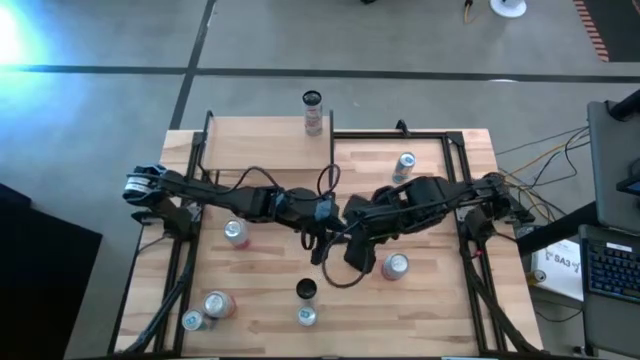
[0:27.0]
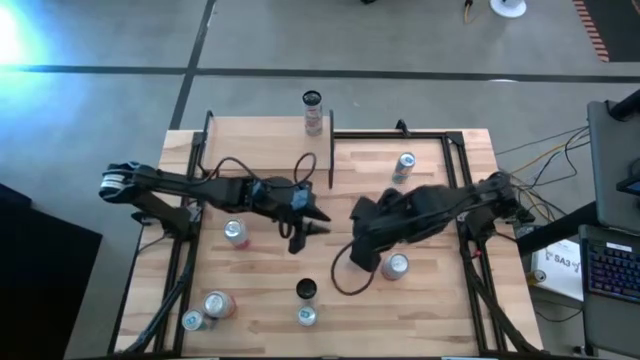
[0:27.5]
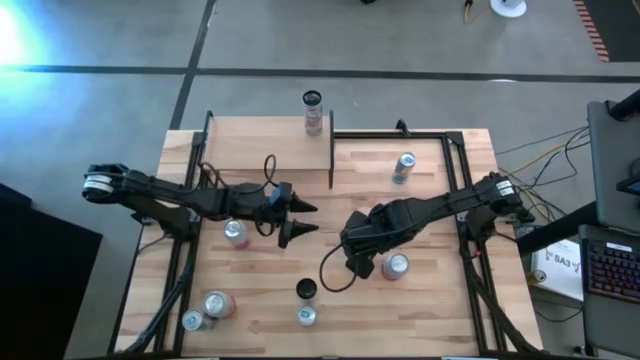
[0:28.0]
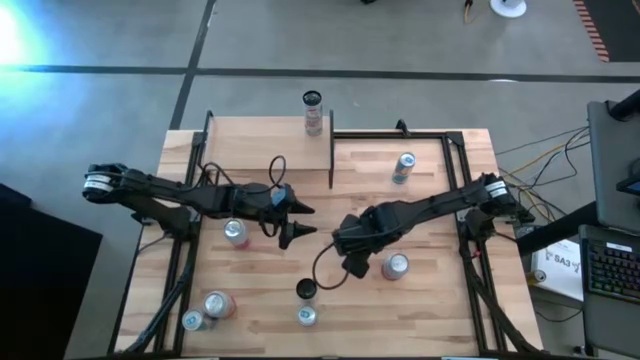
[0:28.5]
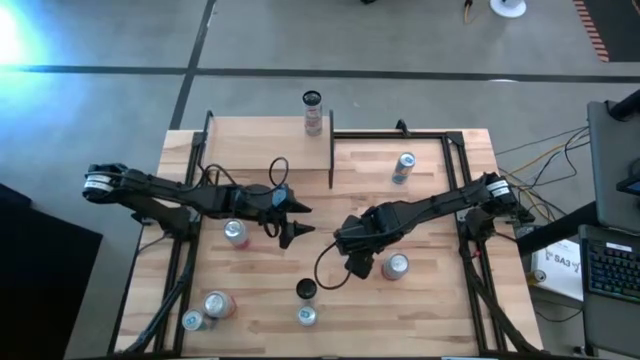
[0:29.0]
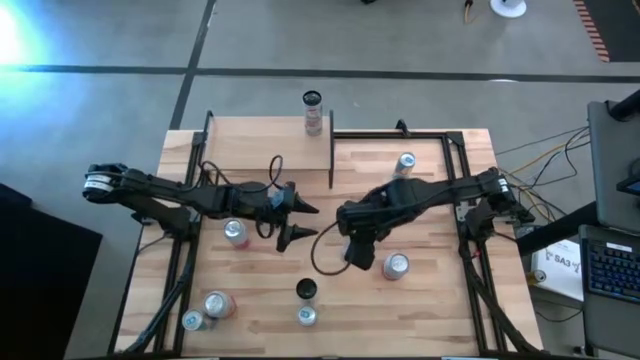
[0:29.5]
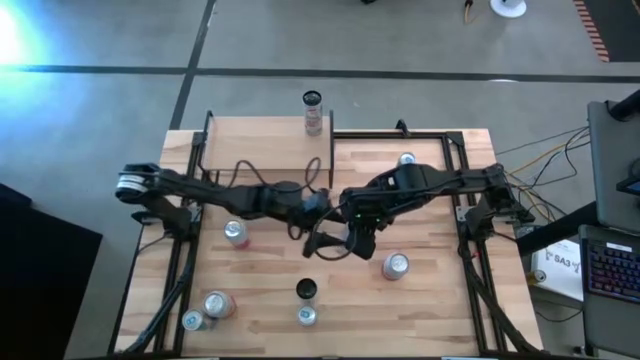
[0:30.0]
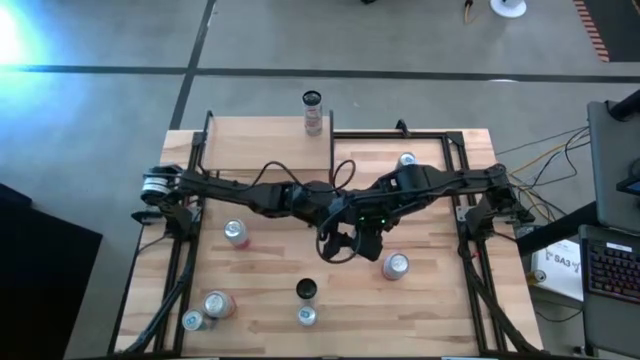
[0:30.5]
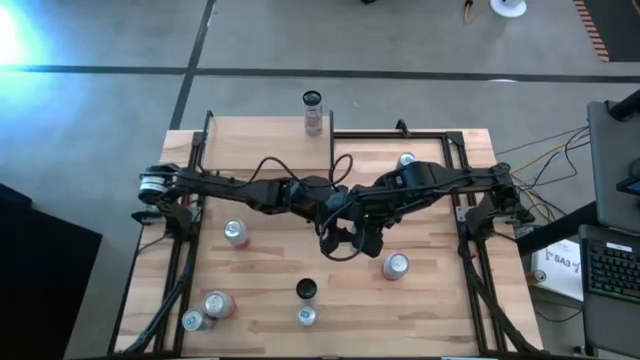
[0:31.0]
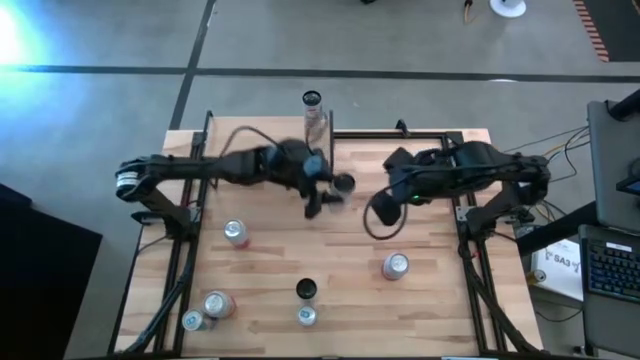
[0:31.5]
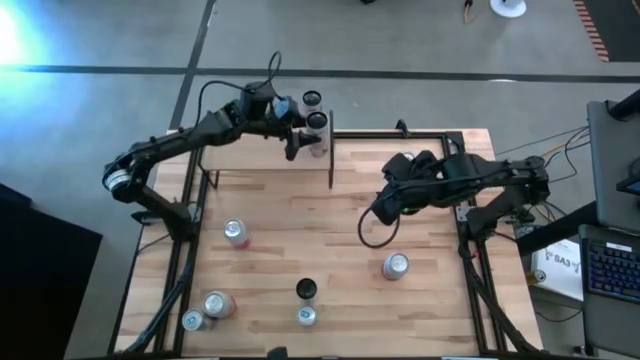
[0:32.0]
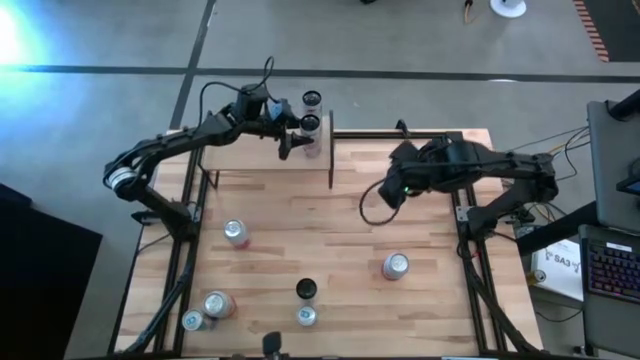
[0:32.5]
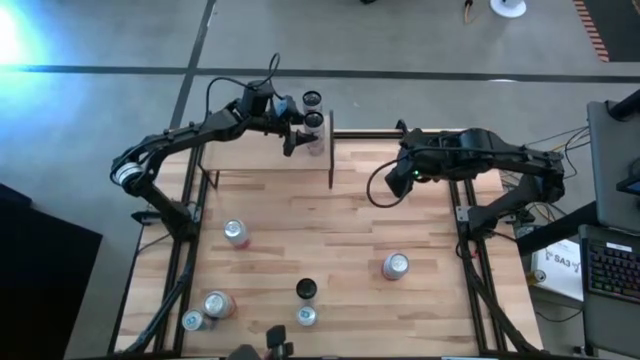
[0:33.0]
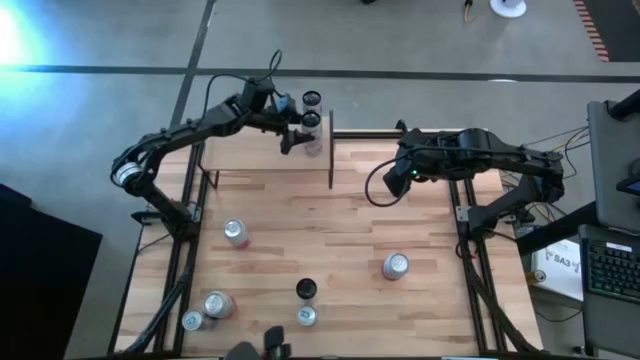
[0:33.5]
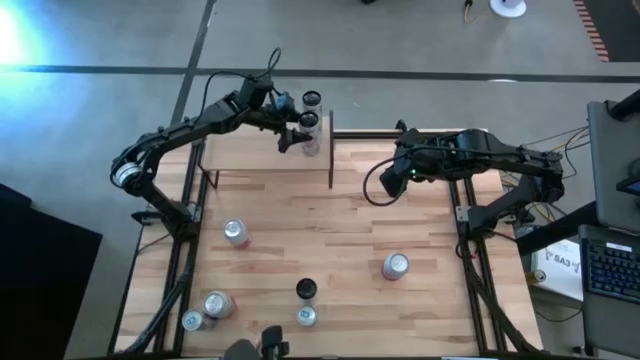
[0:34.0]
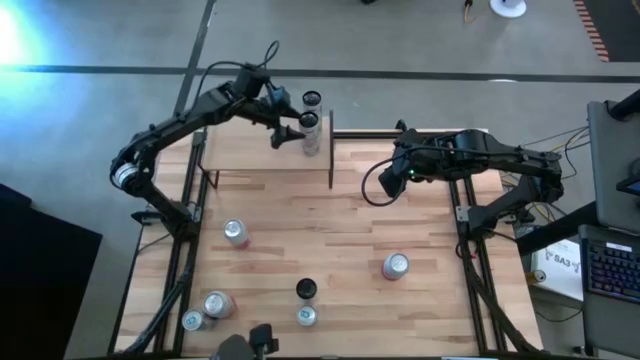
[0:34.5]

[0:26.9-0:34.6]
Task: Place canned beverage on shelf
Put the right white-pink soda can on the shelf aligned with the other white-pink soda can

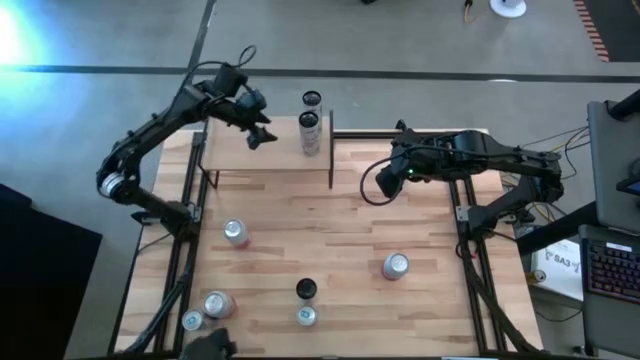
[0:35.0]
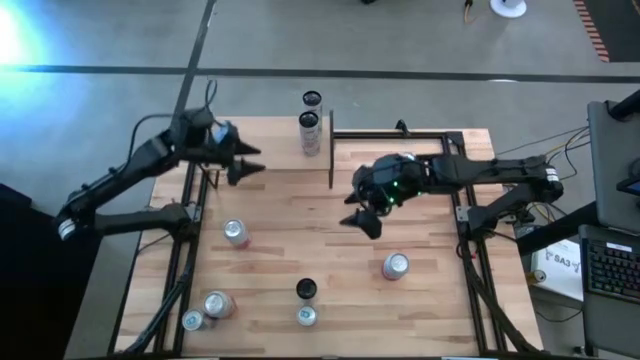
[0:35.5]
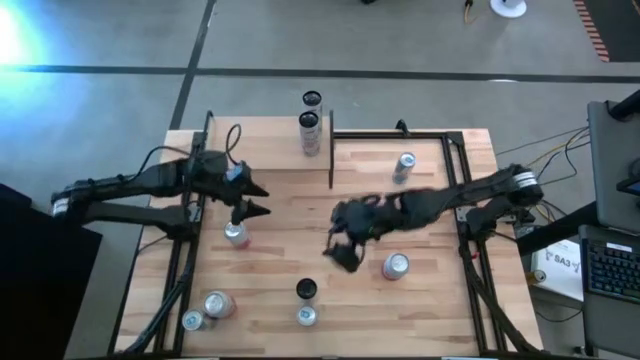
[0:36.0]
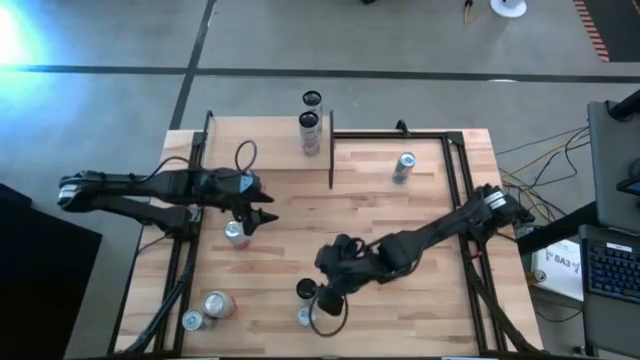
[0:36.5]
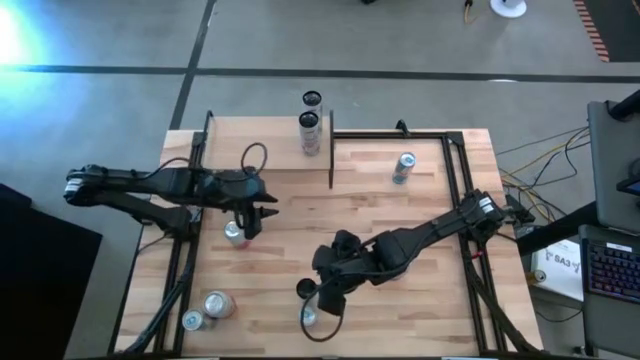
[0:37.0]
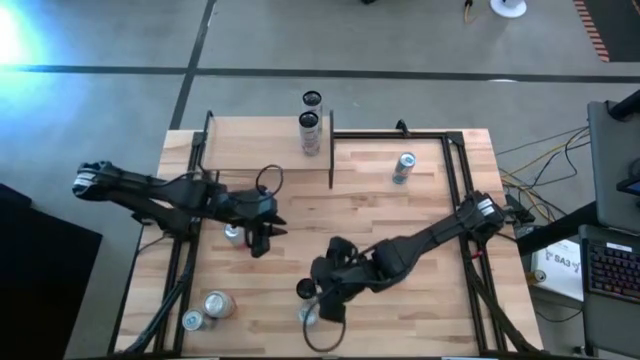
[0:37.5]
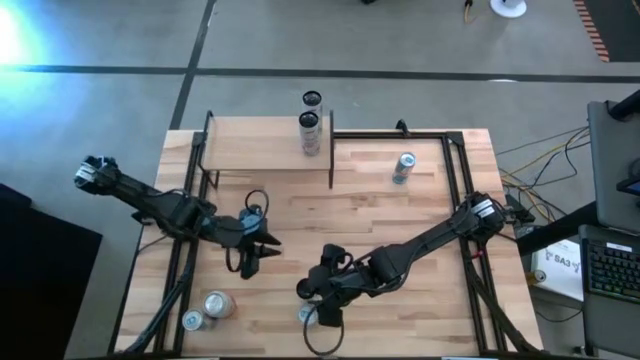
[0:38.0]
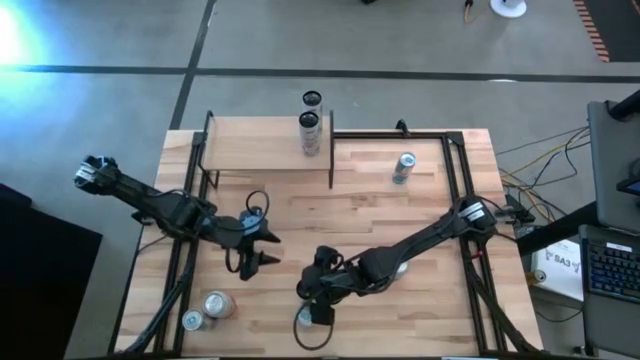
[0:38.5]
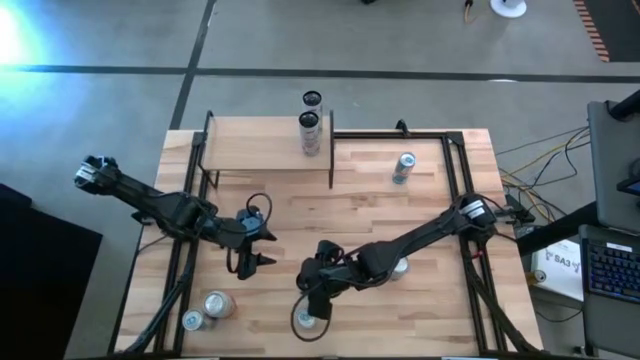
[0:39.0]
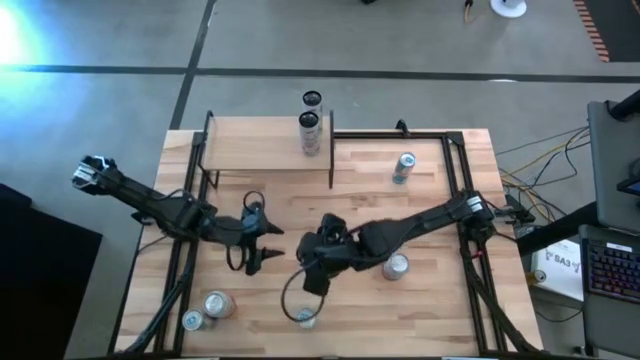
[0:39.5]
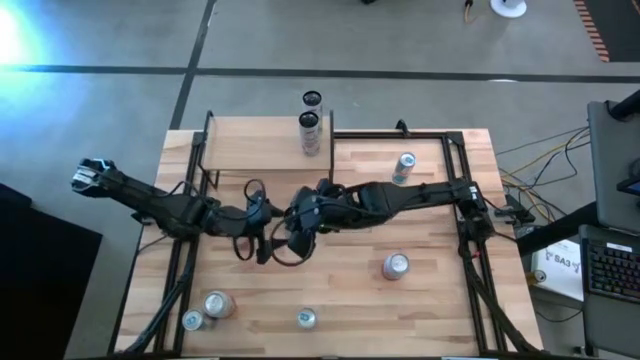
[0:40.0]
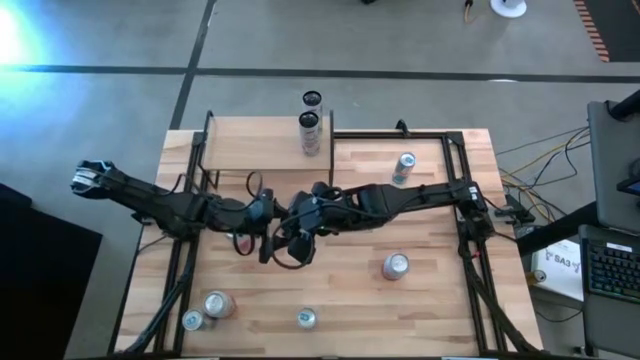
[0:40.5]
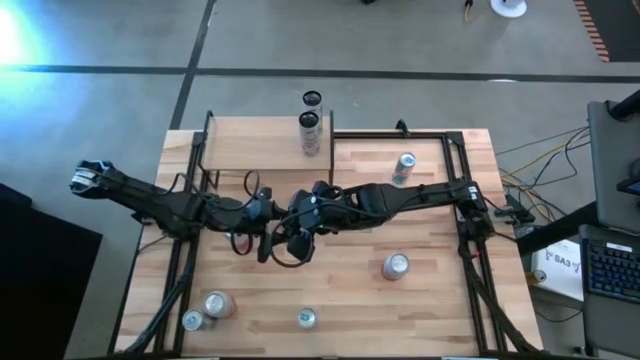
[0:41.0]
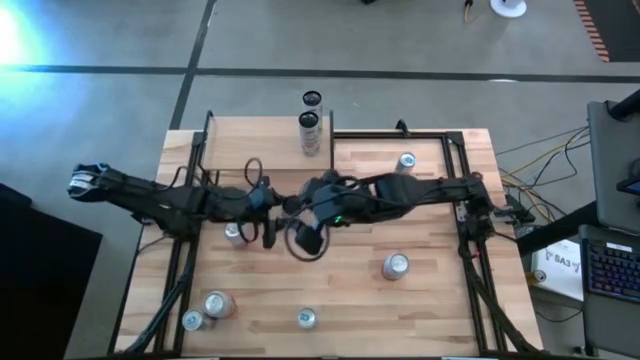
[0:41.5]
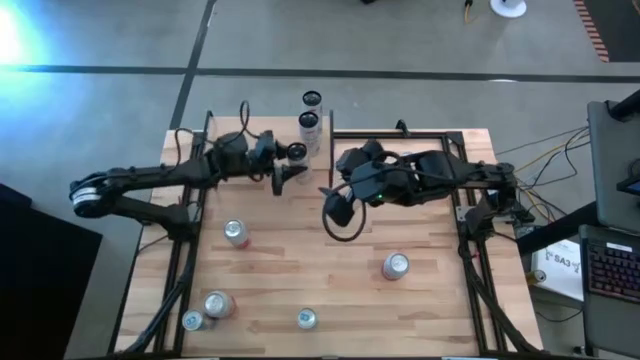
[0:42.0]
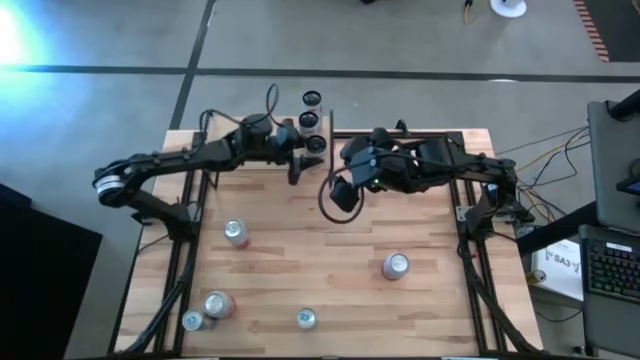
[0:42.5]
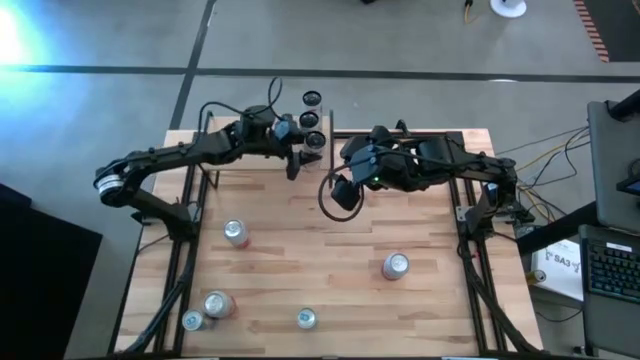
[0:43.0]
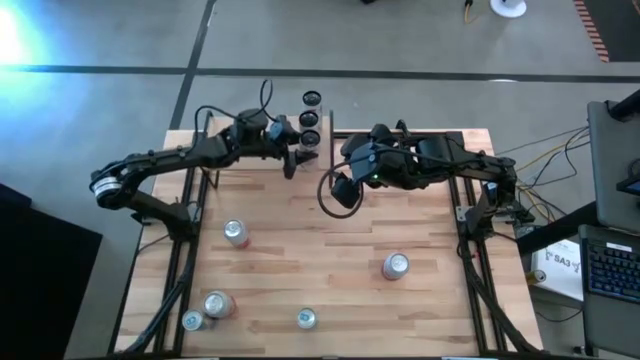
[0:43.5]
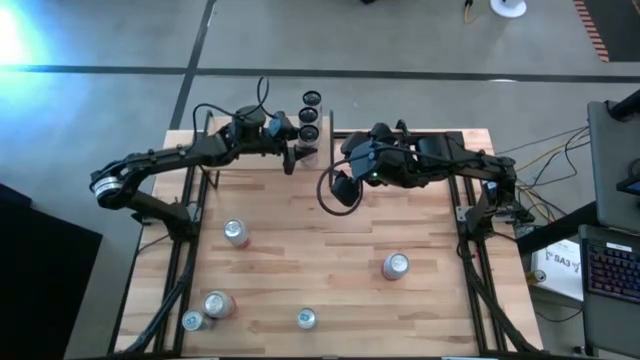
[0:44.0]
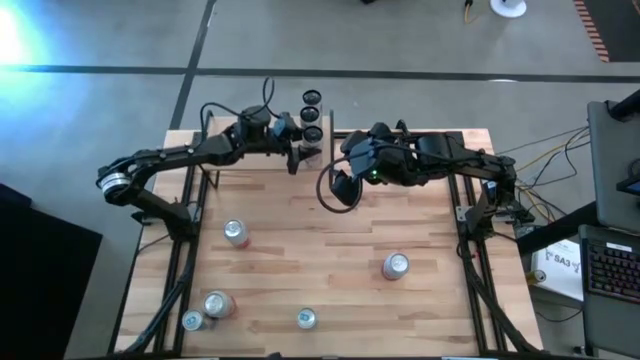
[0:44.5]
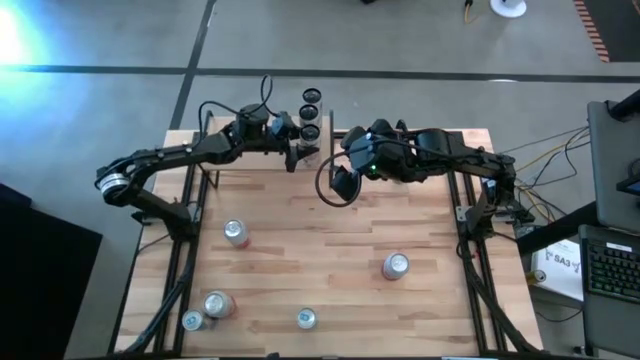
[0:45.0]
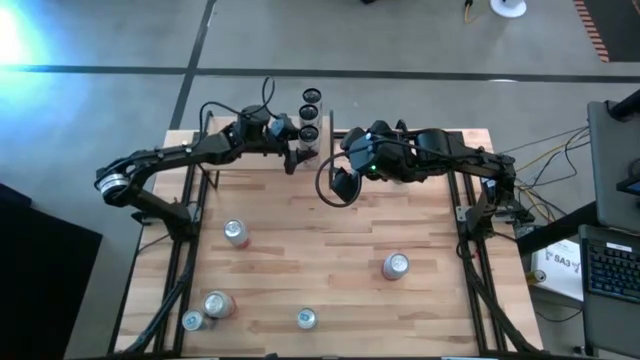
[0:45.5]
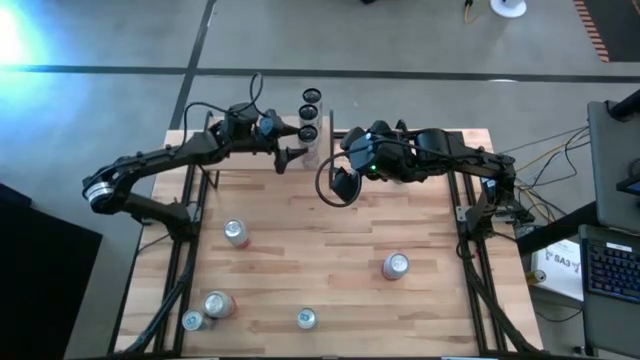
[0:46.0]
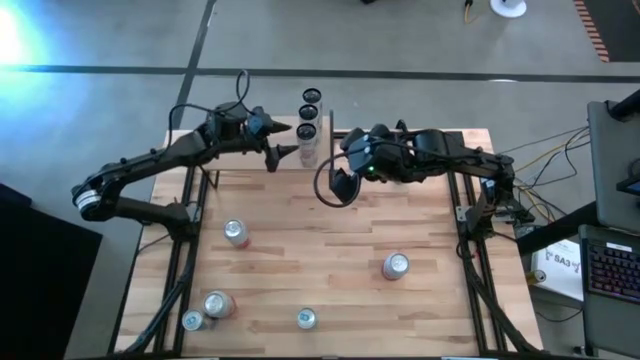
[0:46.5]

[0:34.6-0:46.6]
Put the white-pink soda can on the shelf aligned with the other white-pink soda can

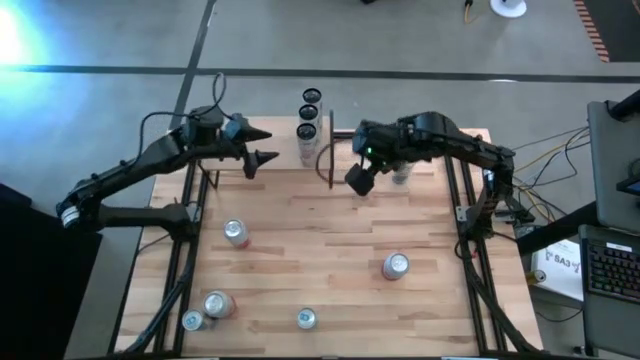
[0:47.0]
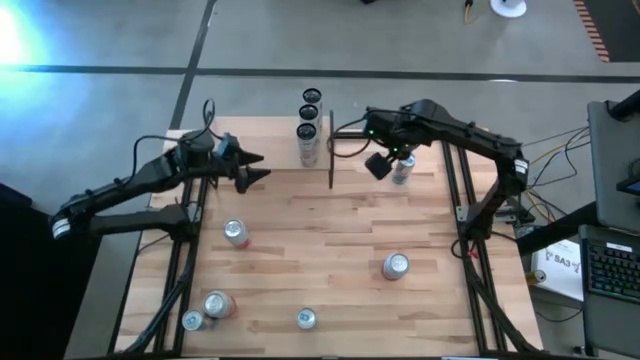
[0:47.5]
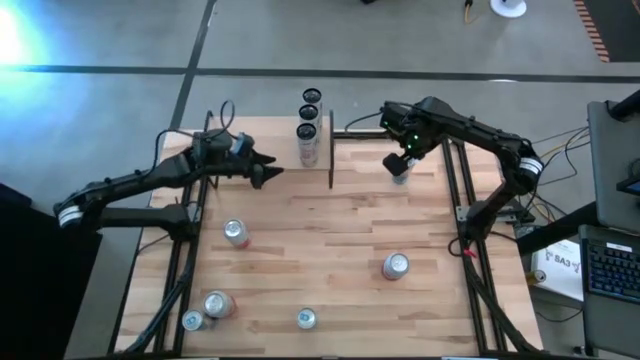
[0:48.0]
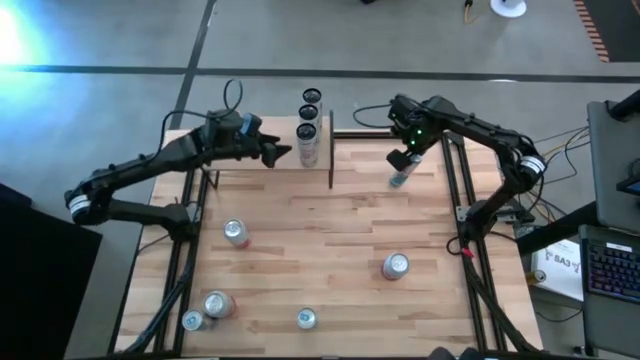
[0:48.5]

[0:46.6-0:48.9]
Put the top right blue soda can on the shelf
